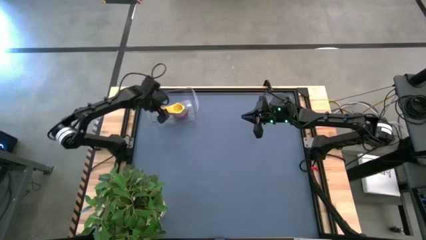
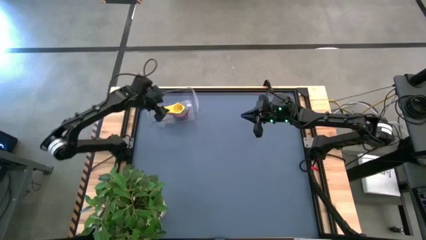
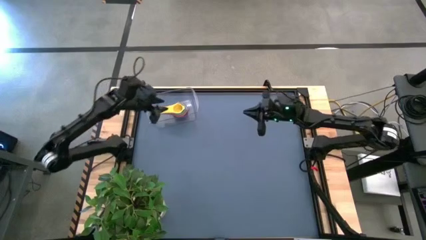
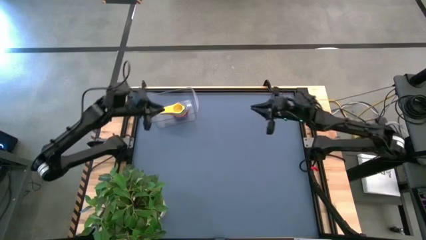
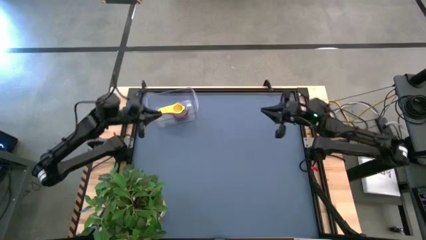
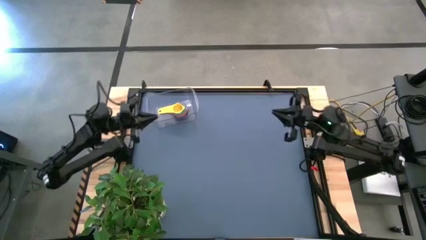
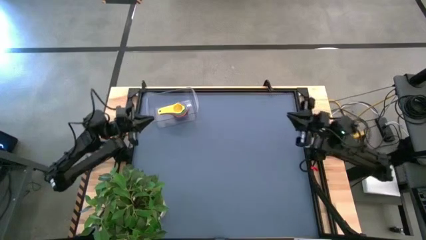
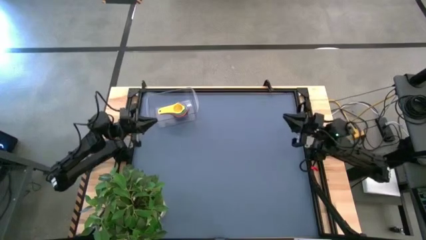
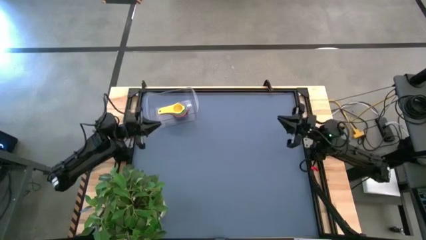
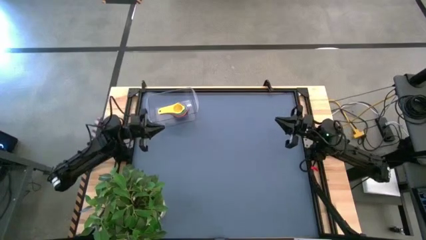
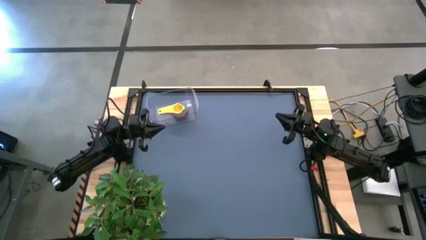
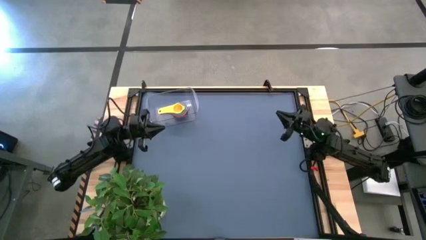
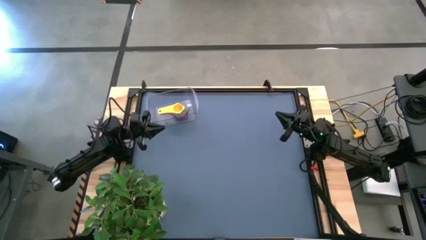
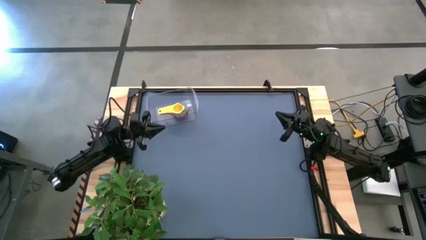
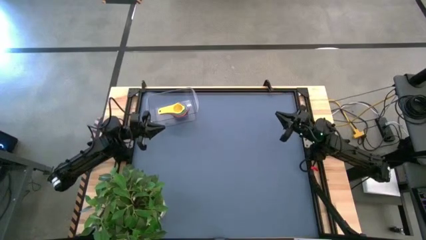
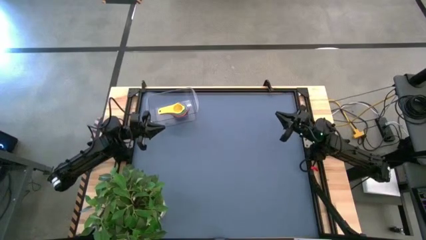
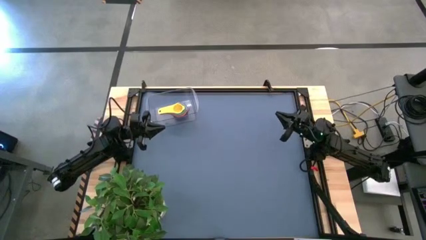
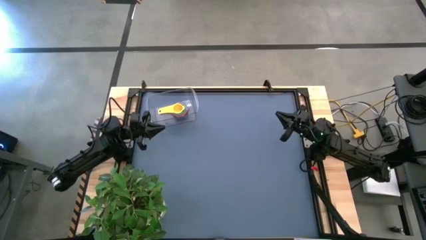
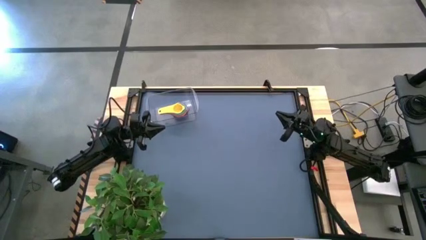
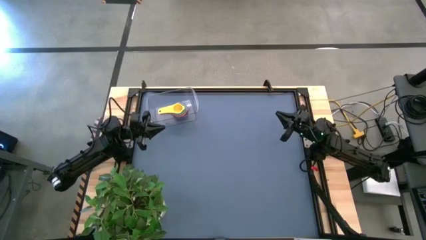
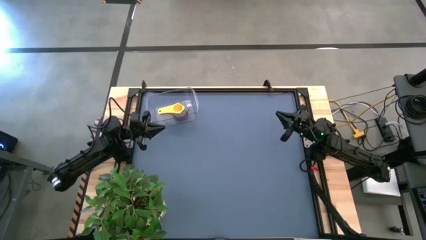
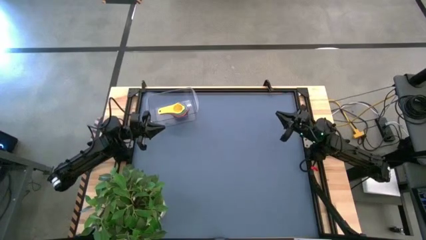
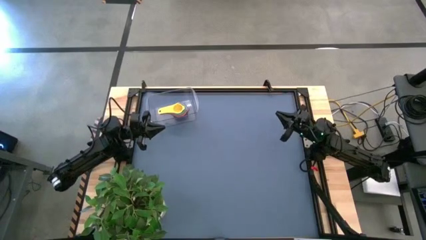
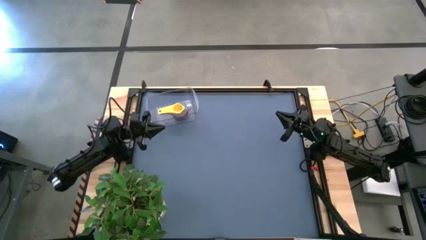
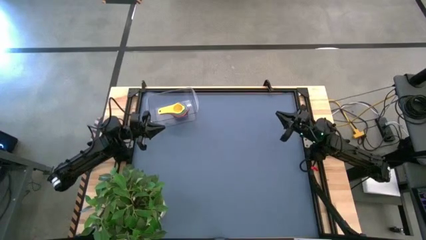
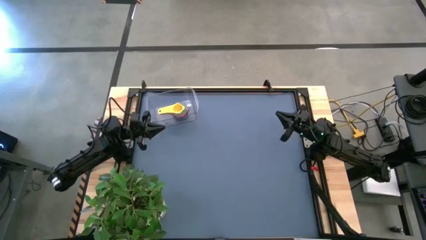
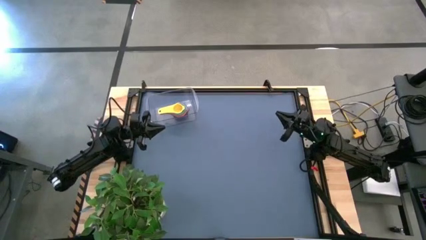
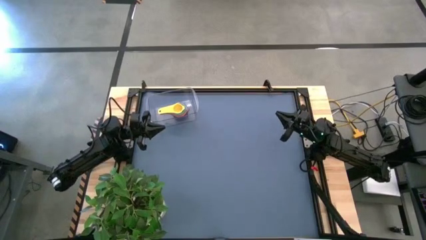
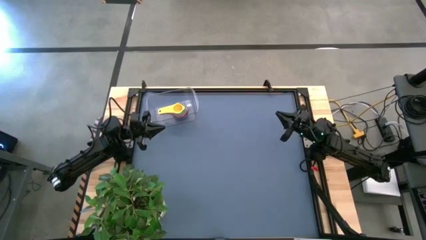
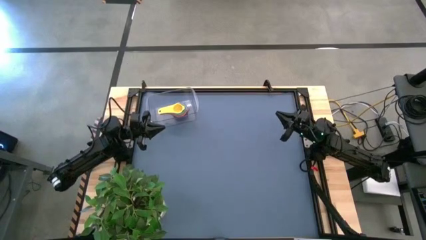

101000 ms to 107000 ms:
Task: Nest measuring cups in basket
Return to Home Position

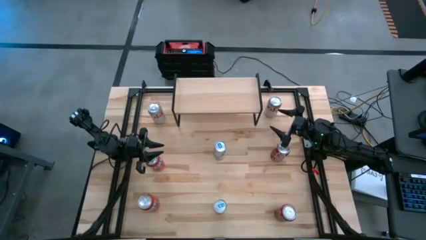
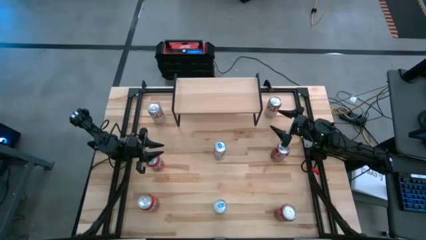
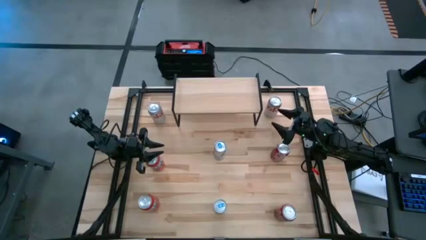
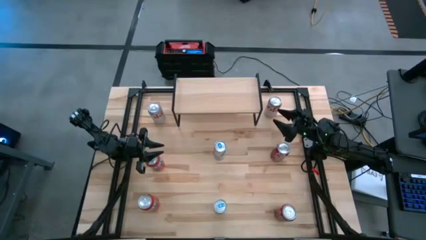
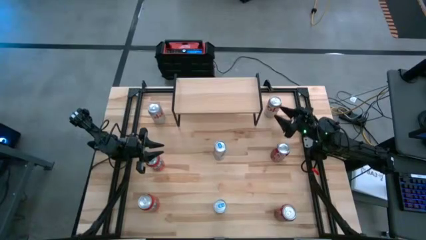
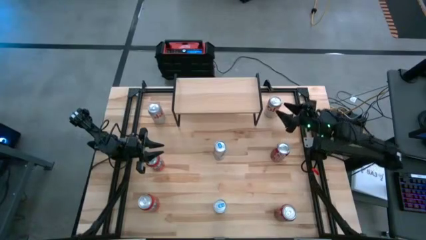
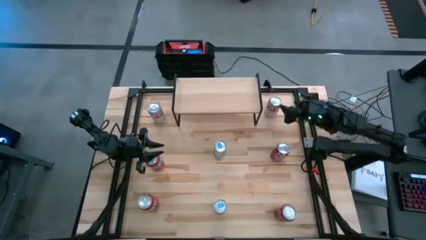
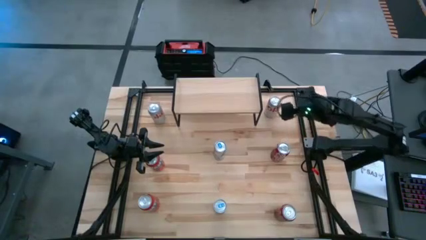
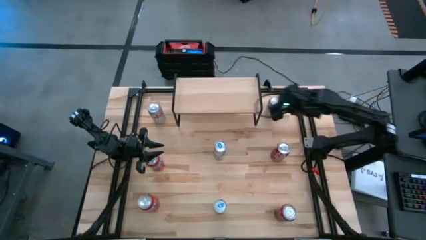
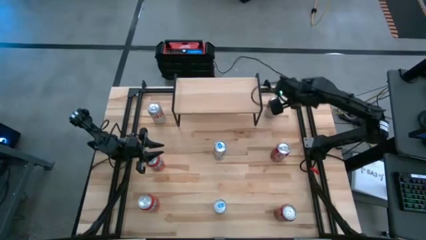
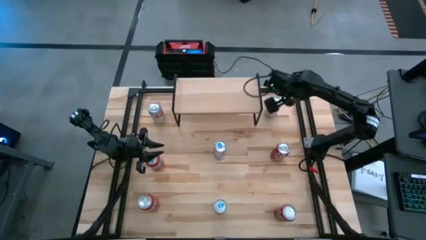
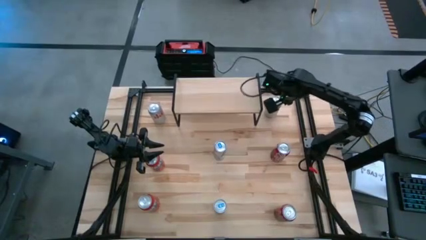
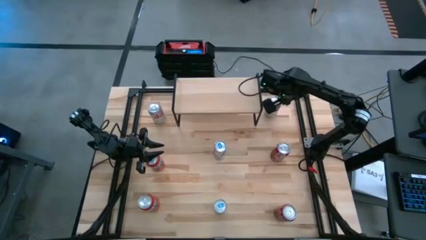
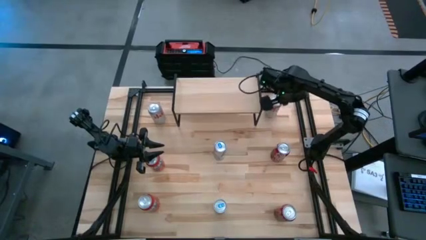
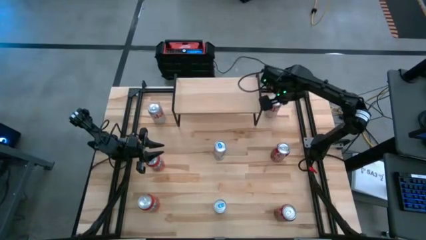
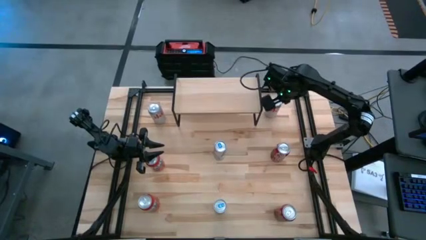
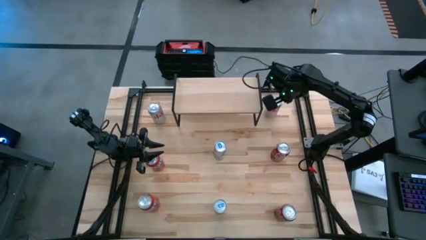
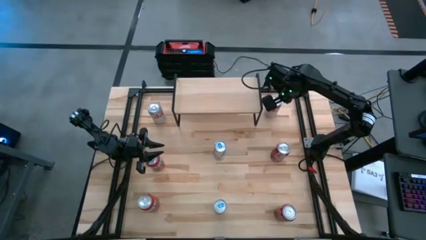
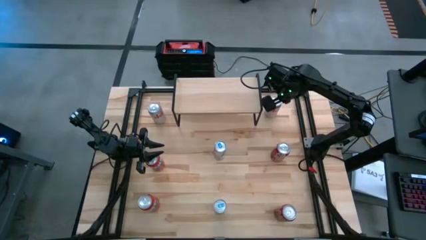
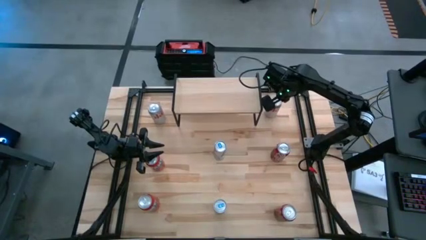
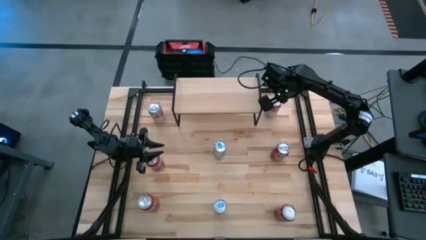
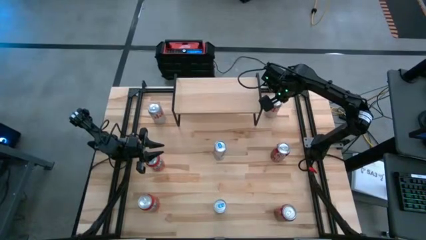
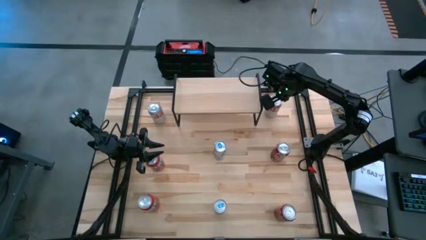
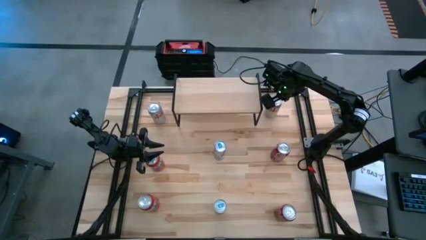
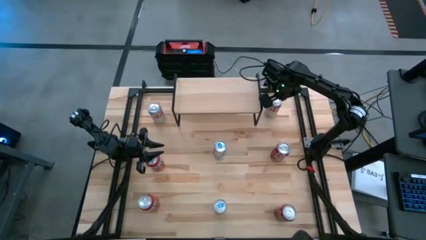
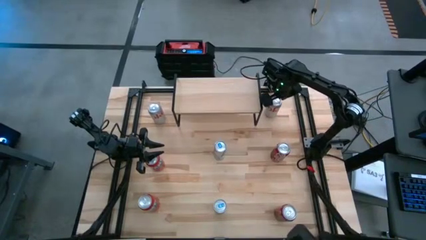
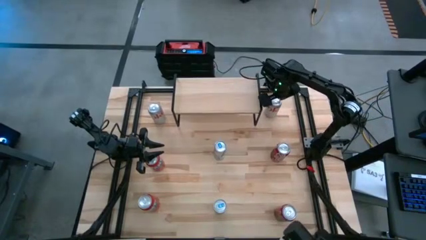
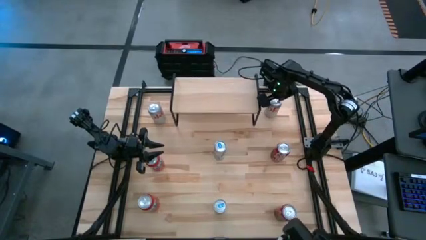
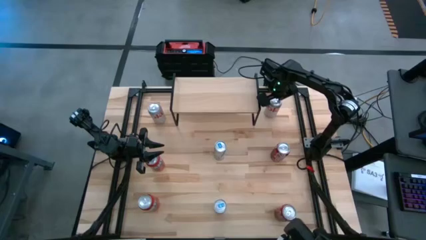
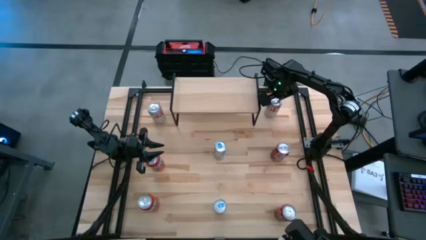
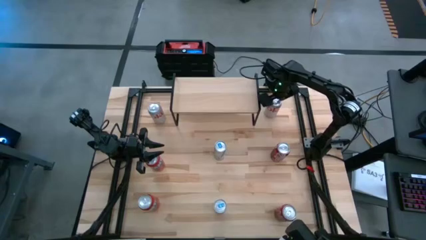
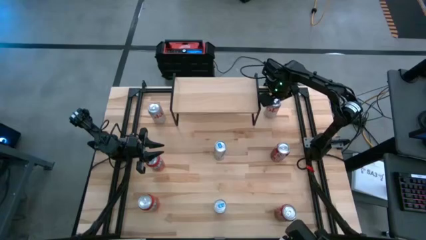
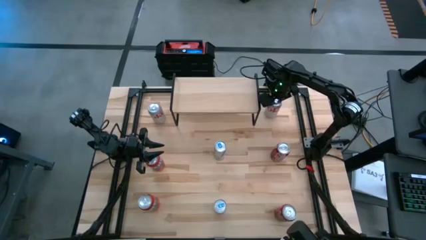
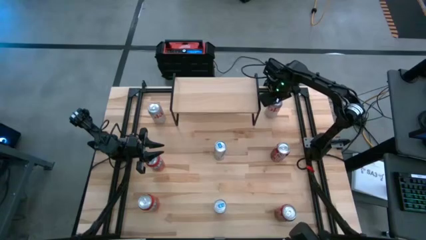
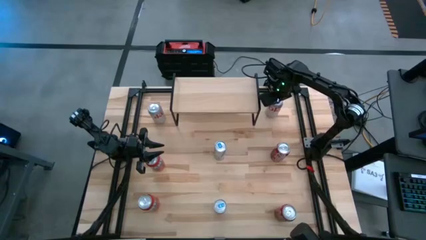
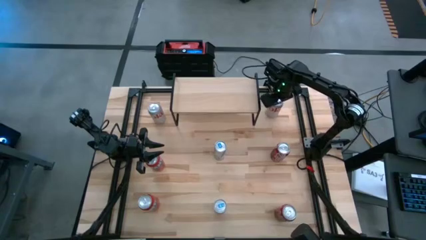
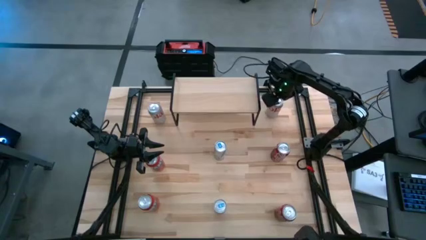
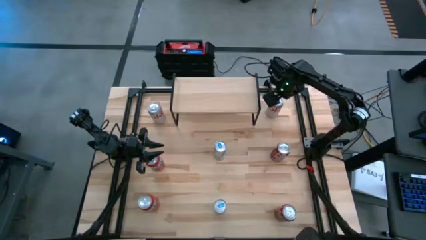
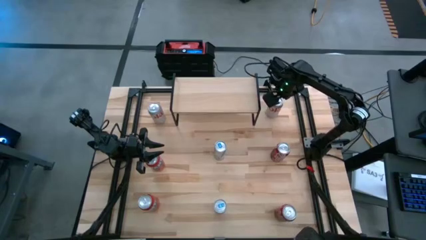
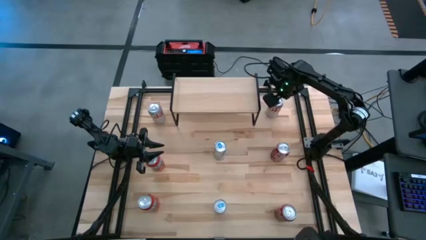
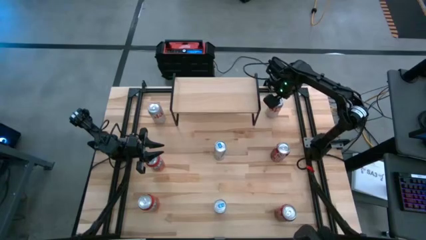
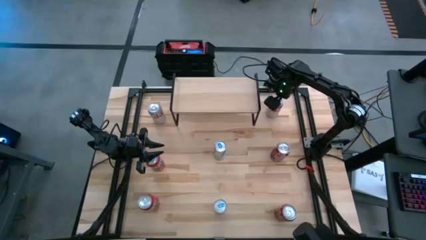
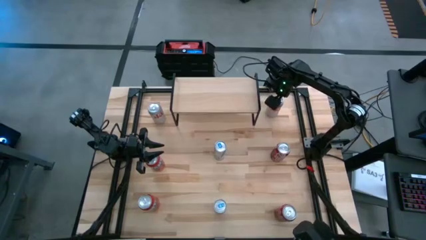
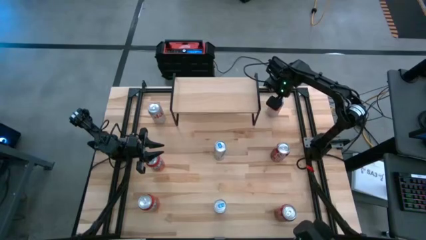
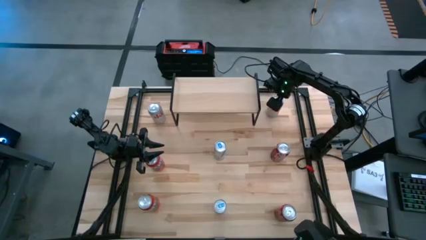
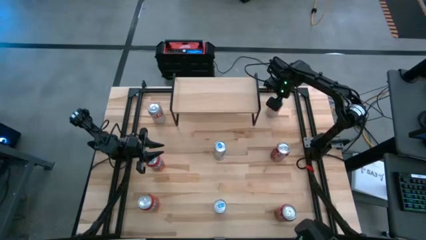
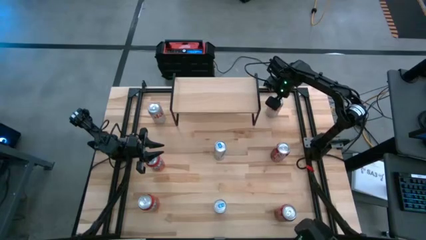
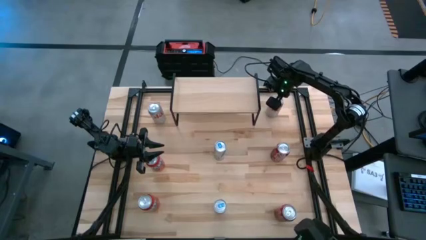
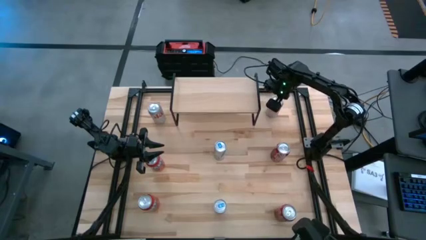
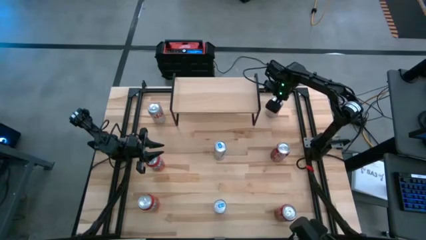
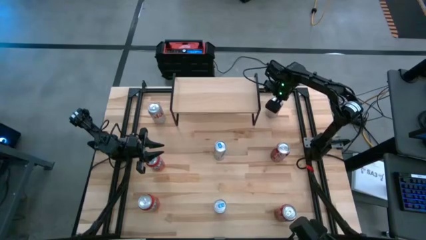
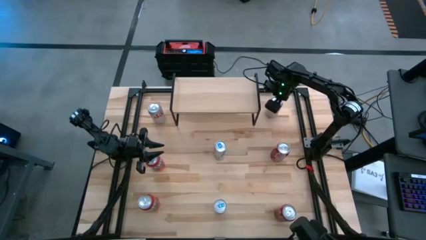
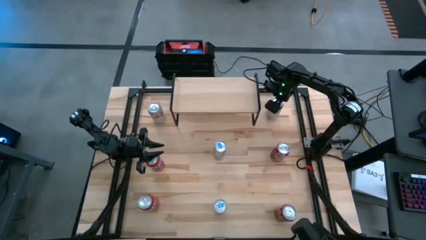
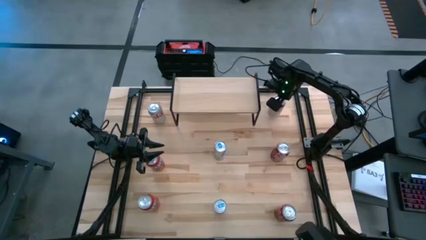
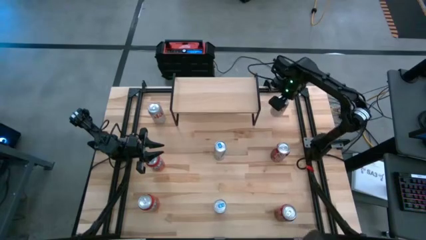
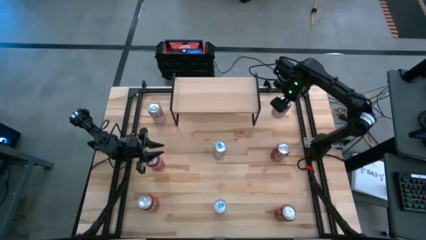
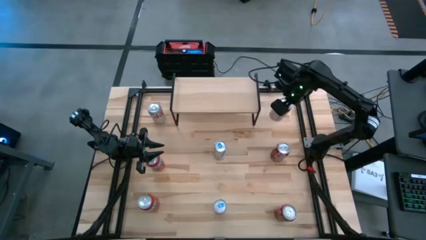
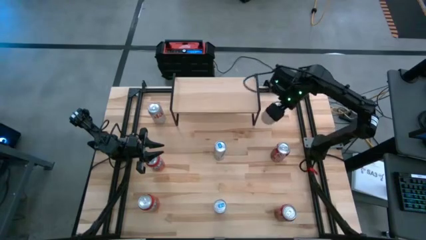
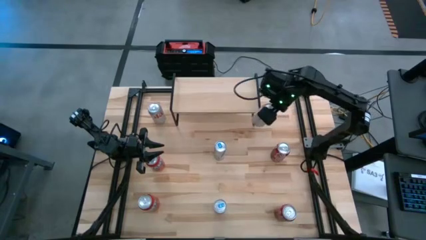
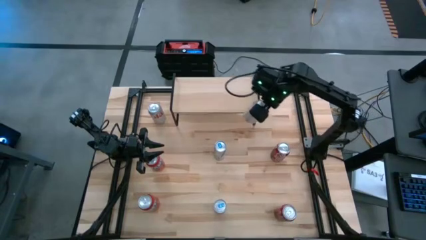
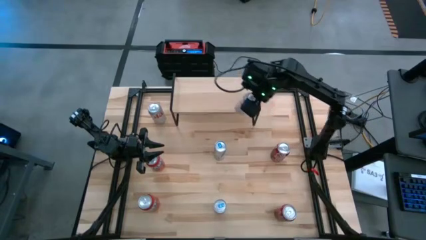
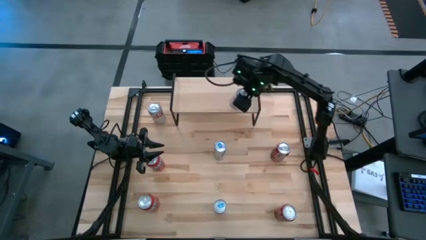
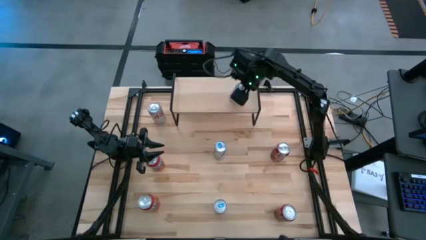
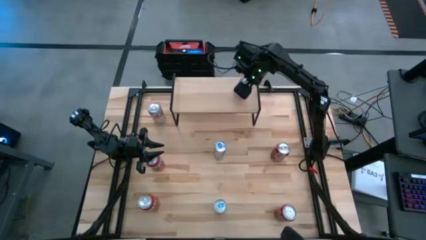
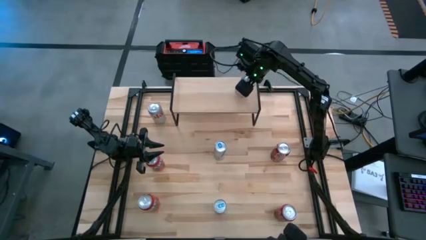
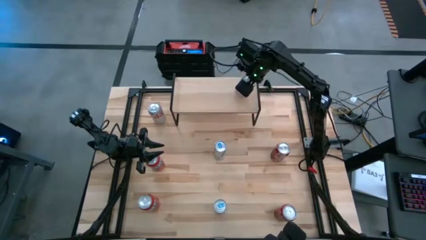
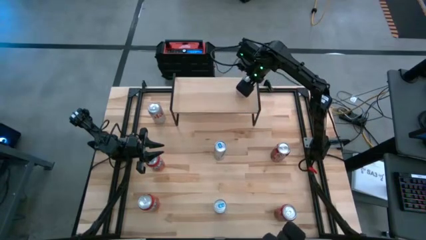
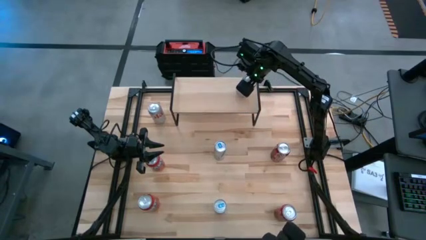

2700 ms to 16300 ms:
Task: Place canned beverage on shelf
Put the right red and silver soda can on the shelf
